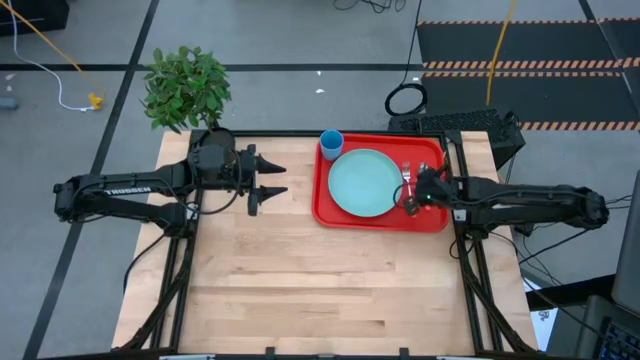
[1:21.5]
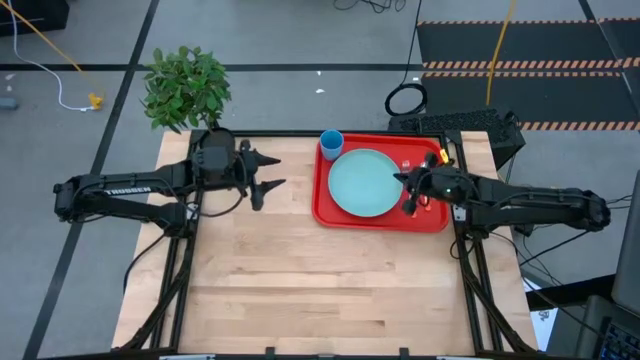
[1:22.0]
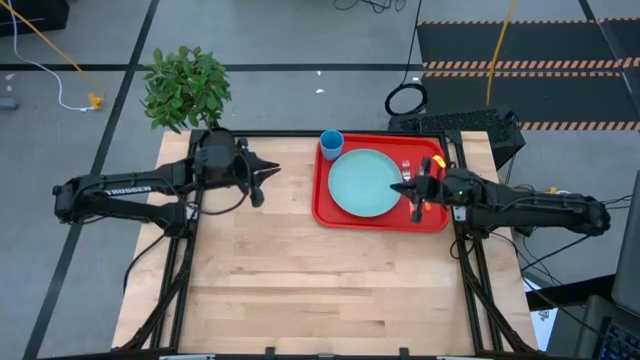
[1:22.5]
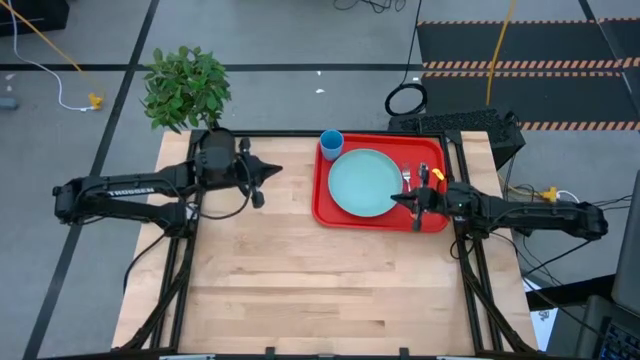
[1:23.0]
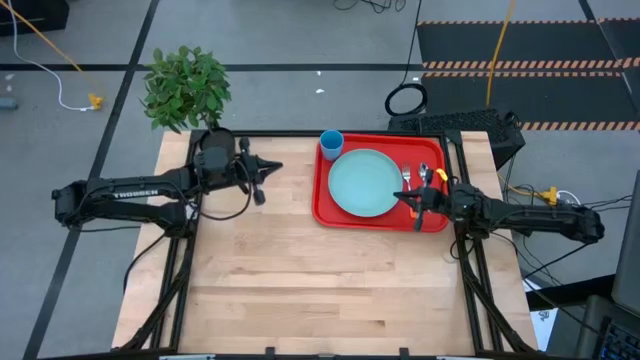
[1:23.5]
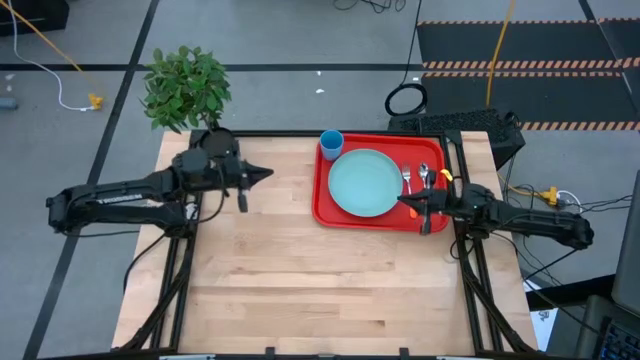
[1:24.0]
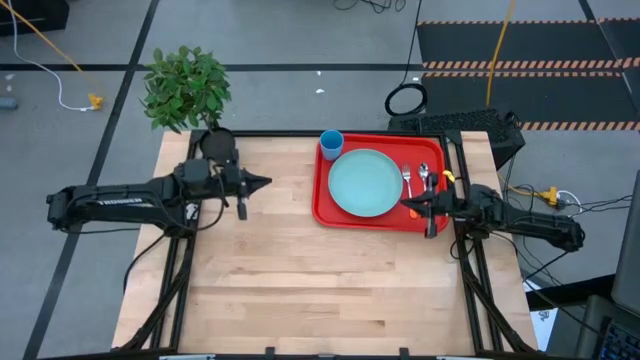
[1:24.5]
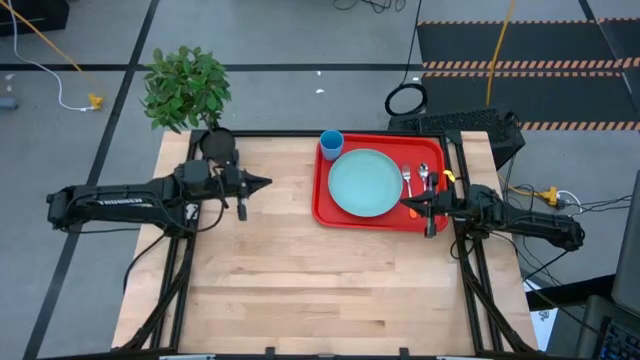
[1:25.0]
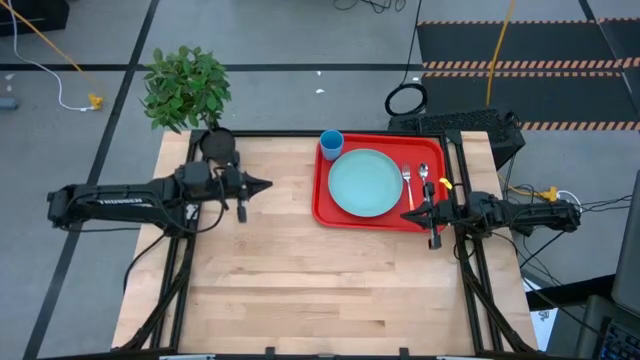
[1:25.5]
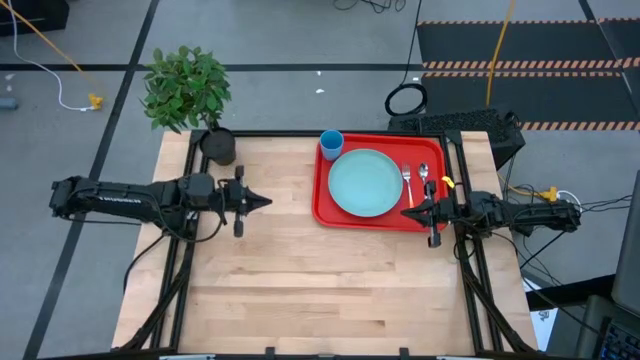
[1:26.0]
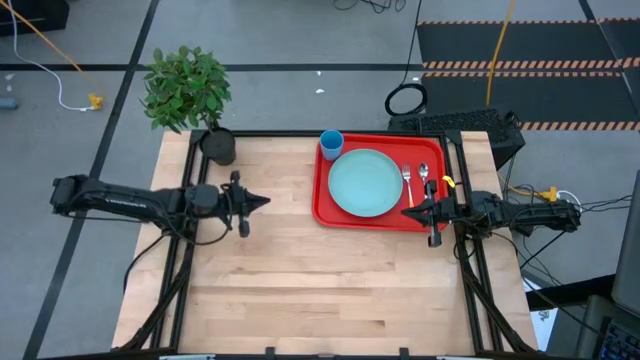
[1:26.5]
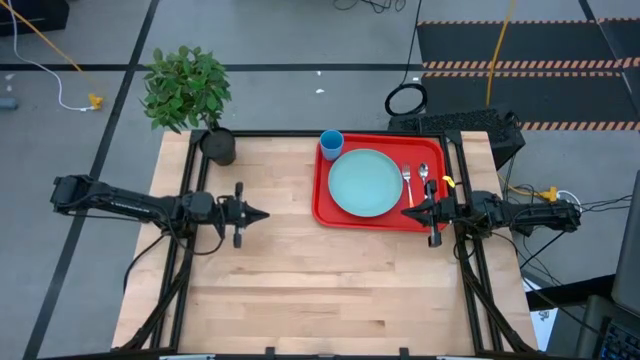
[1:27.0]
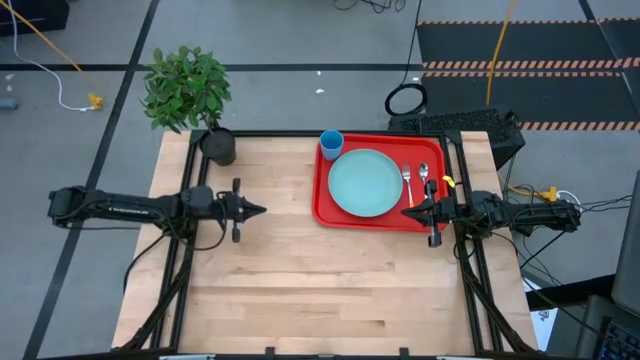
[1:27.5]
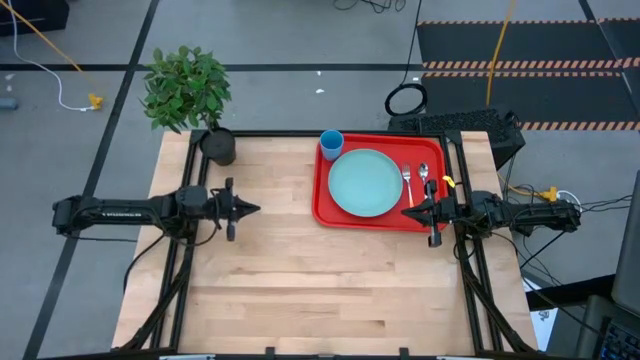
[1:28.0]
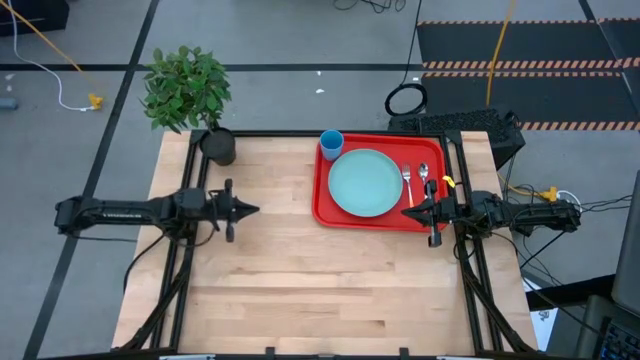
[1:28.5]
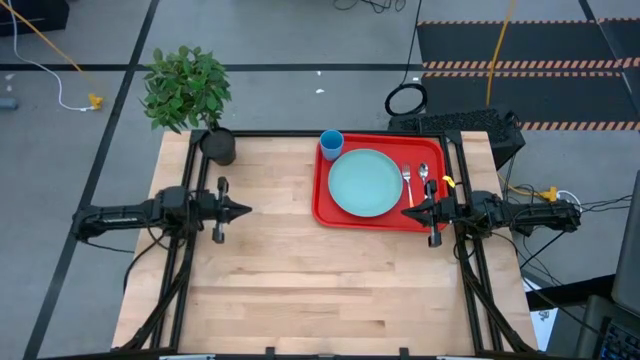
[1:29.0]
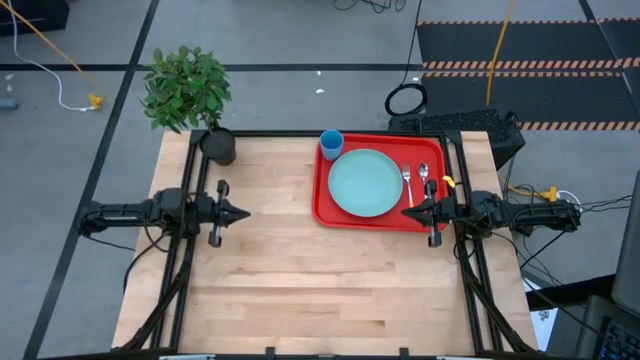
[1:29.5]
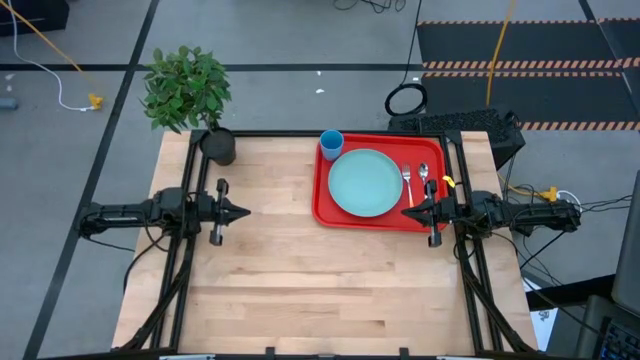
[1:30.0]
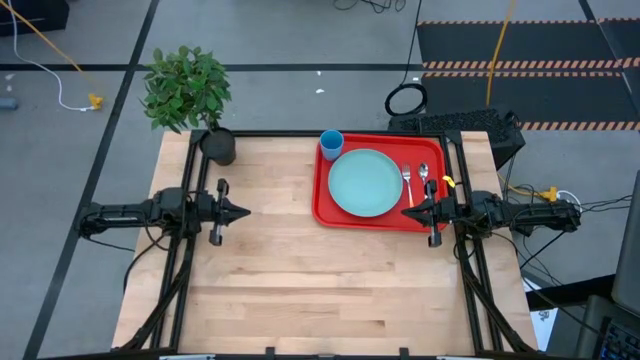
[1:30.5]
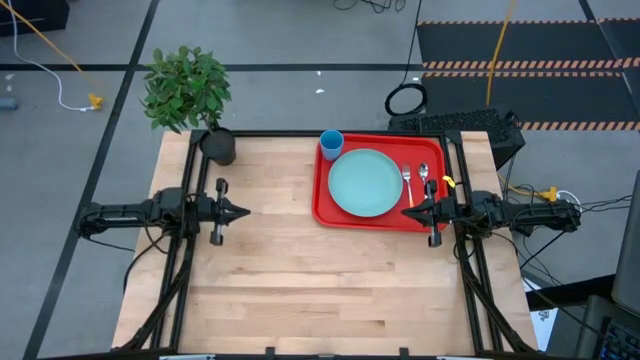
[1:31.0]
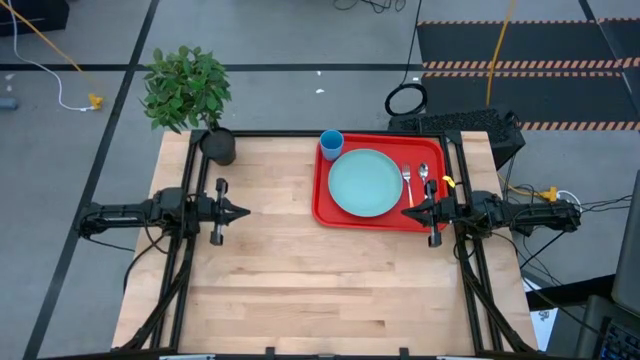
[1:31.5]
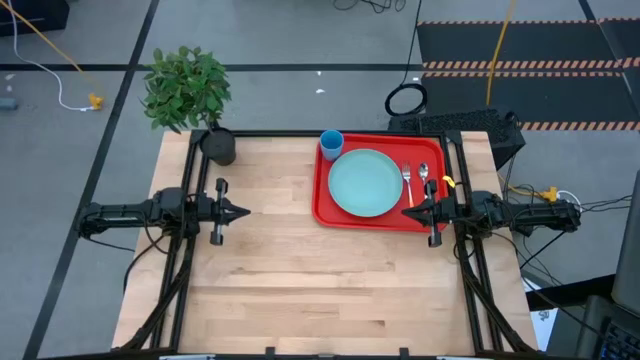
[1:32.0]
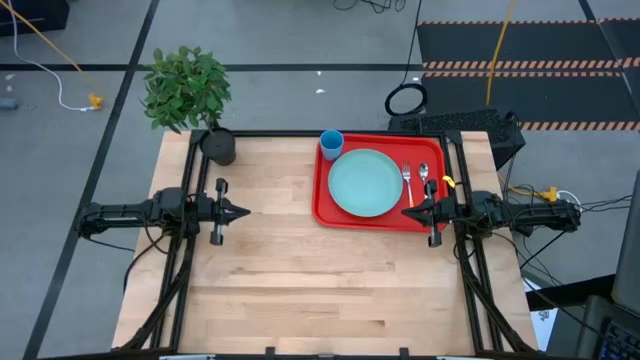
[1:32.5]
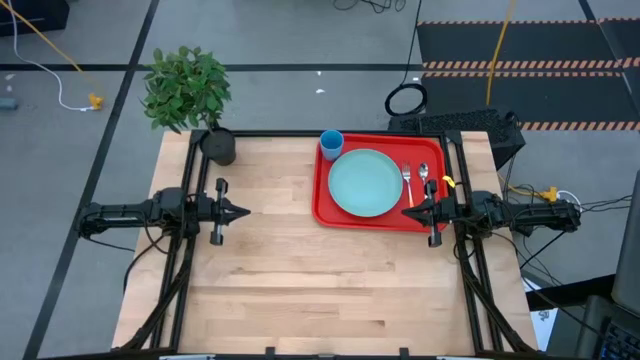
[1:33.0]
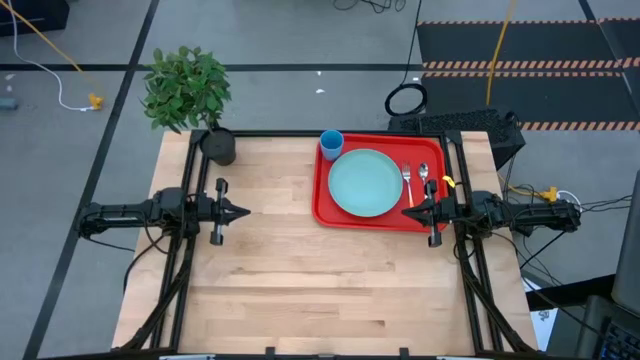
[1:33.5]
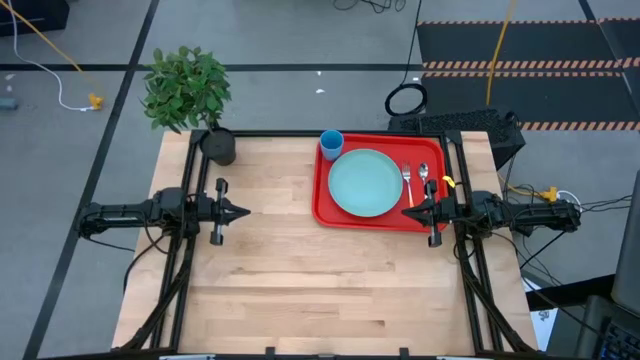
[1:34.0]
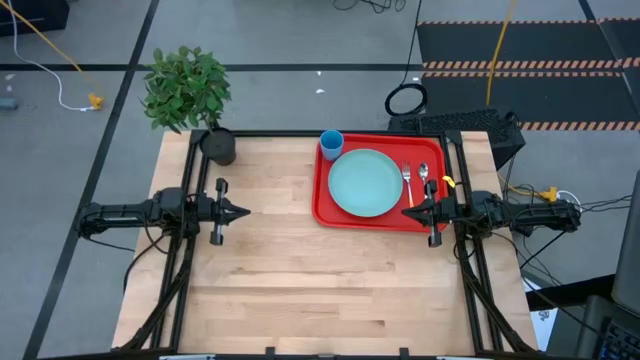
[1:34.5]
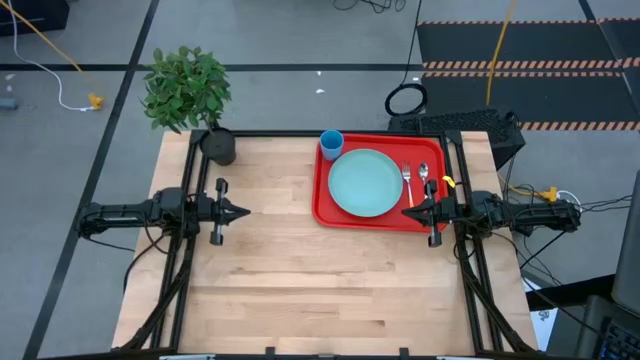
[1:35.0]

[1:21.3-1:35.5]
Task: Pick and place plate/cup/fork/spoon on tray
Return to Home Position

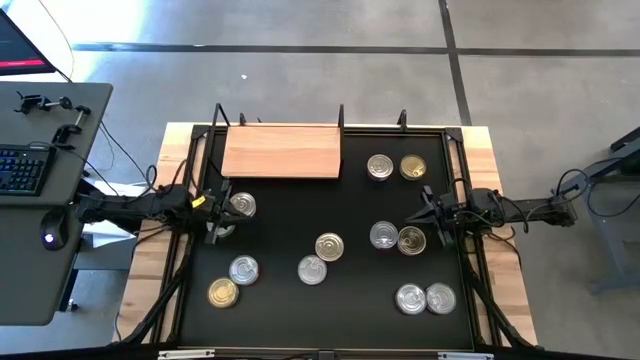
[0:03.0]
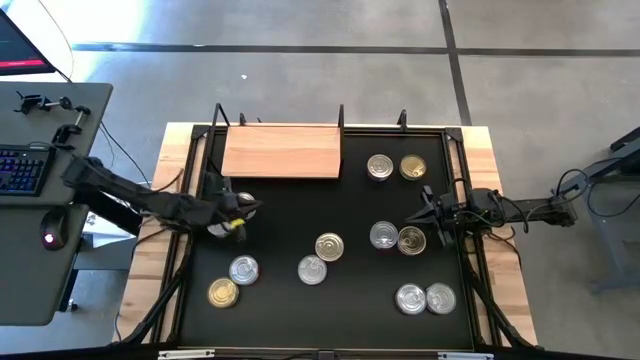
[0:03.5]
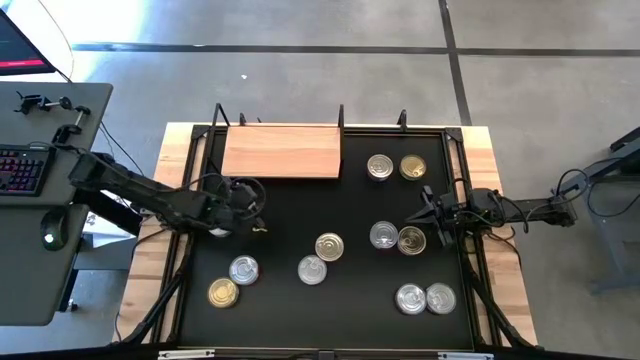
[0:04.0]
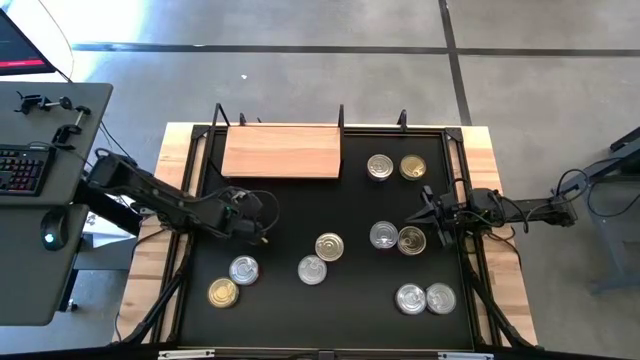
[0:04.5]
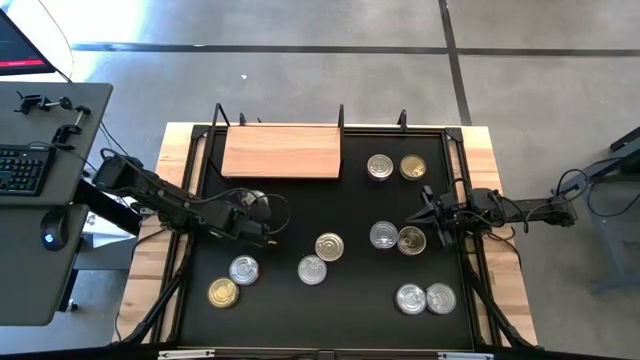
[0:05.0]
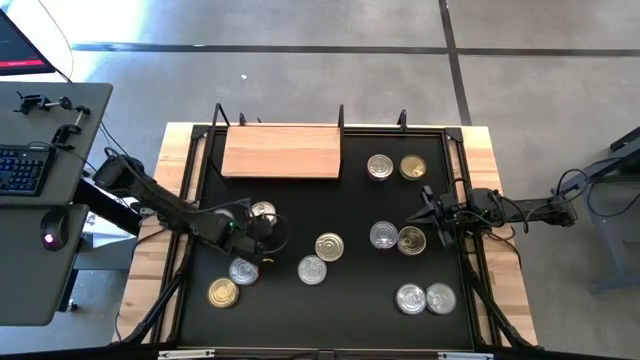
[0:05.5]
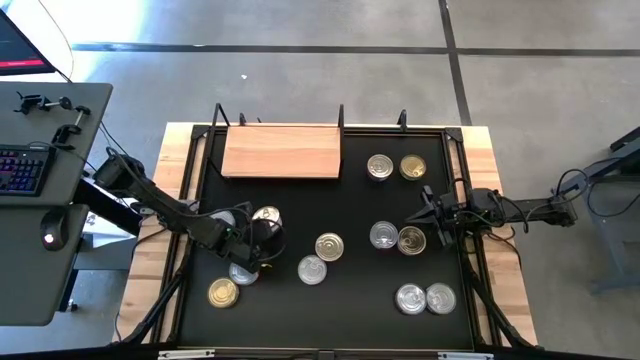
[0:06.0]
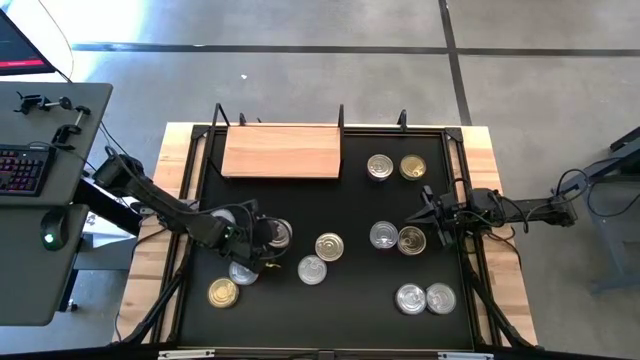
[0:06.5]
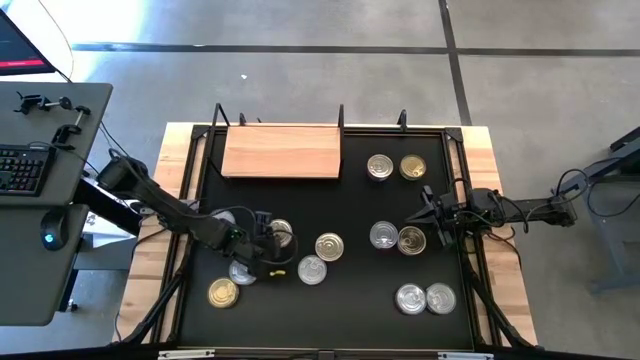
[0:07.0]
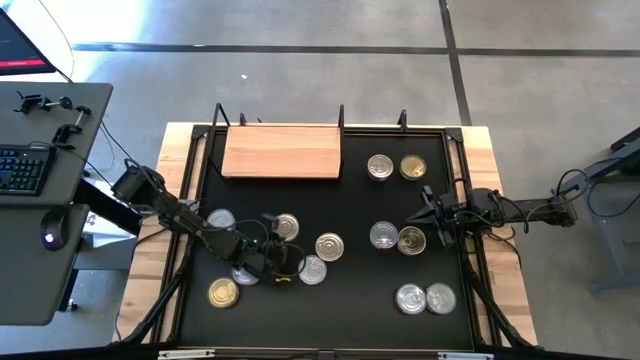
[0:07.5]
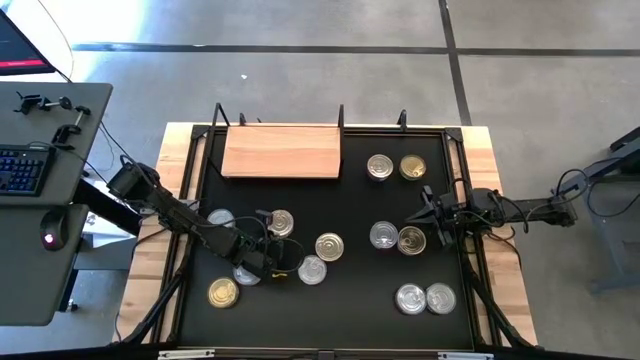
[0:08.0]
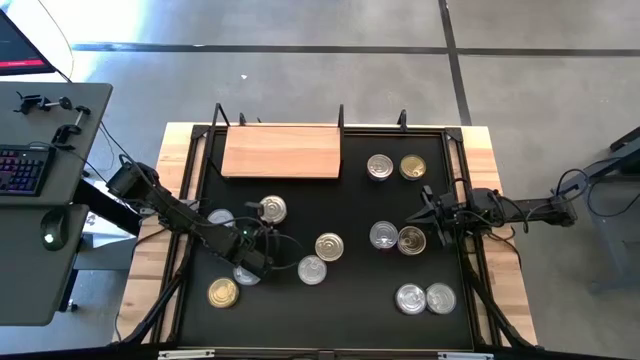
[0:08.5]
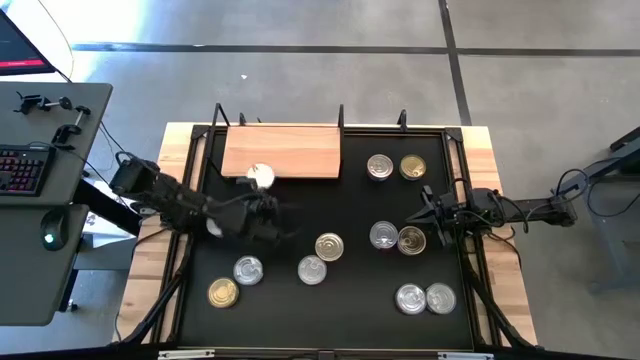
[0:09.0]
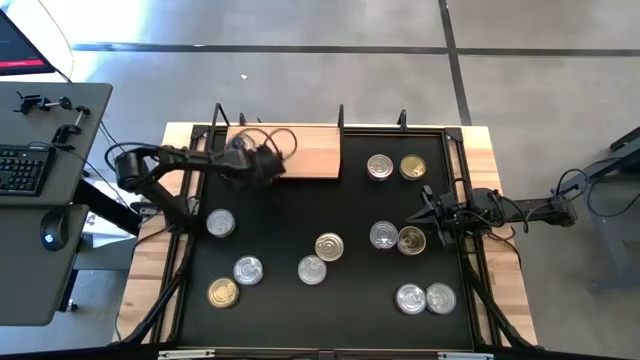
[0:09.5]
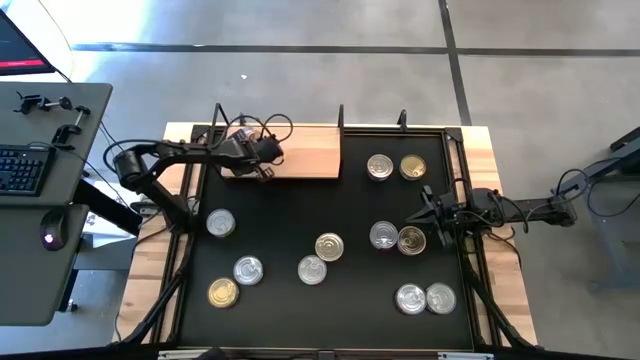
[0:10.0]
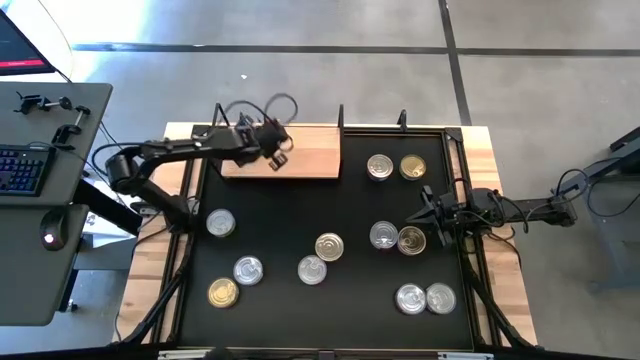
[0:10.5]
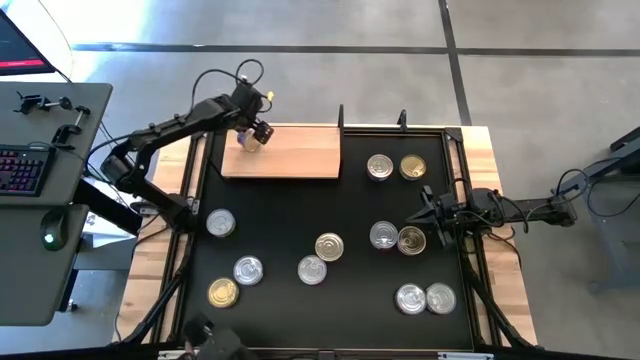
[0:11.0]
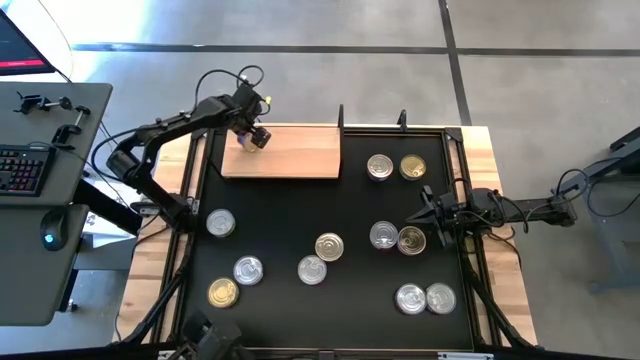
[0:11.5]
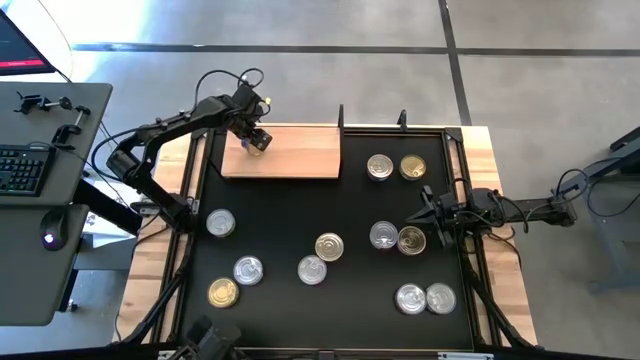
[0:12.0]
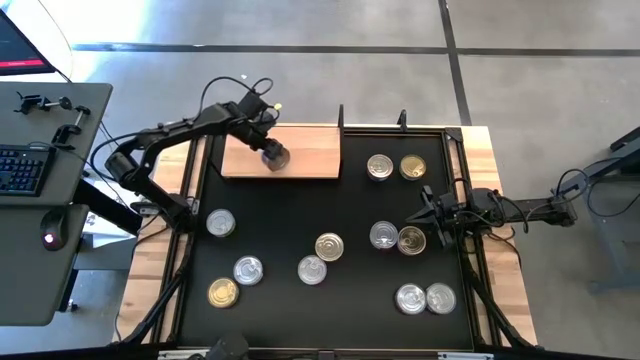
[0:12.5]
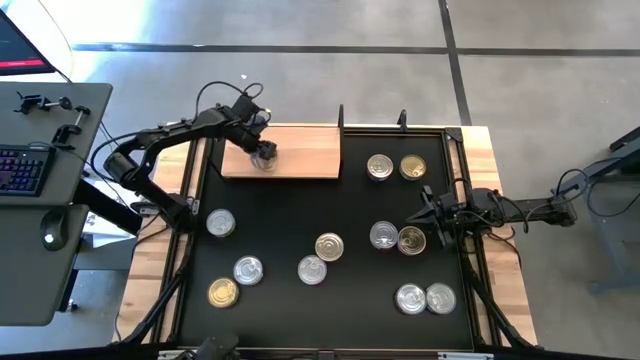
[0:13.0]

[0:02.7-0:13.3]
Task: Stack canned seafood by type on shelf
Put the blue tuna can on the shelf
